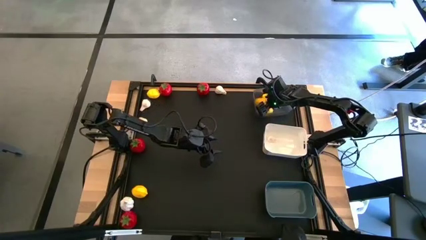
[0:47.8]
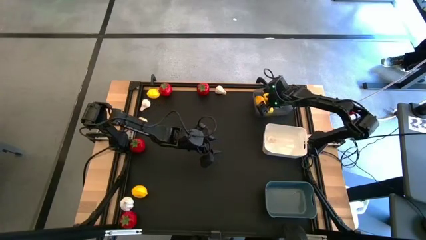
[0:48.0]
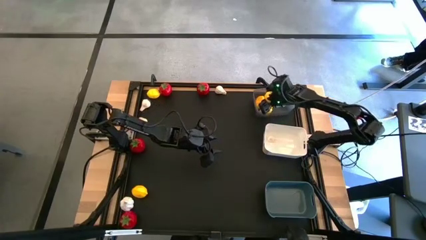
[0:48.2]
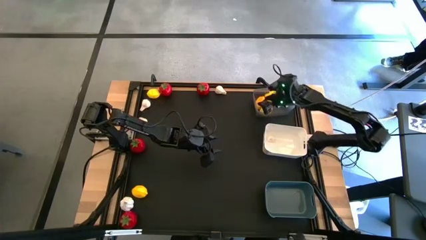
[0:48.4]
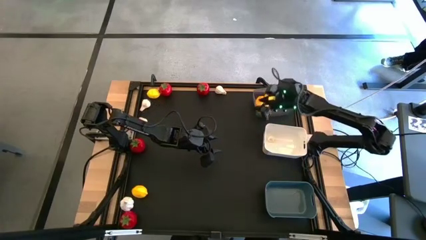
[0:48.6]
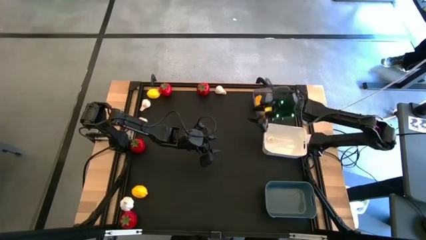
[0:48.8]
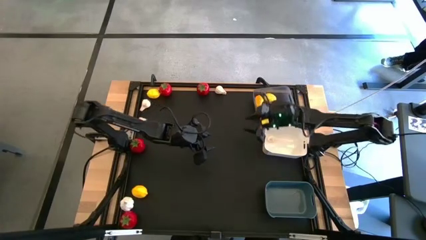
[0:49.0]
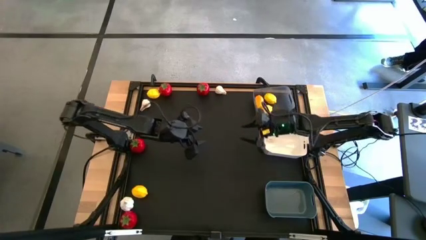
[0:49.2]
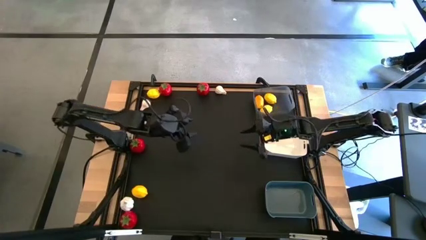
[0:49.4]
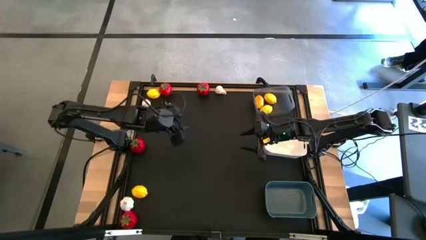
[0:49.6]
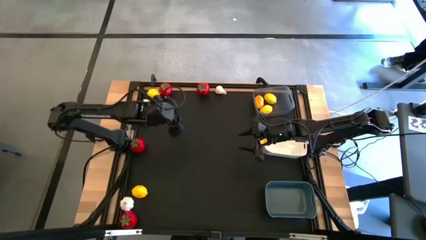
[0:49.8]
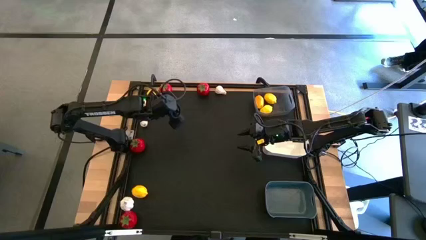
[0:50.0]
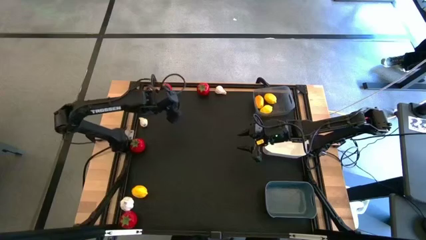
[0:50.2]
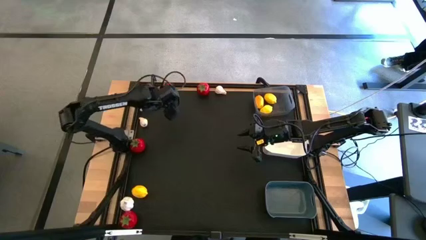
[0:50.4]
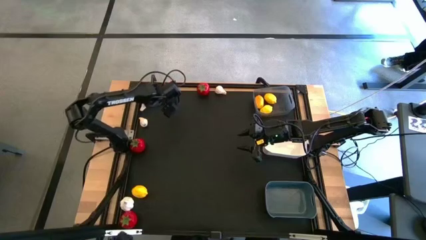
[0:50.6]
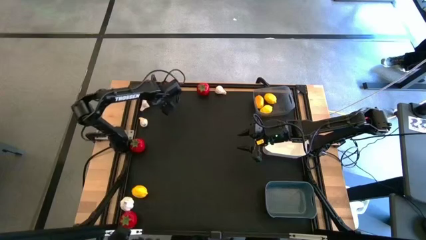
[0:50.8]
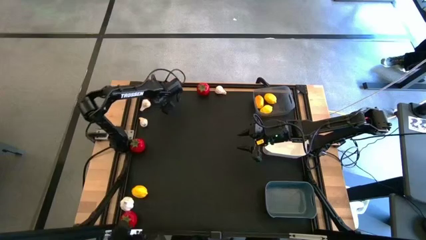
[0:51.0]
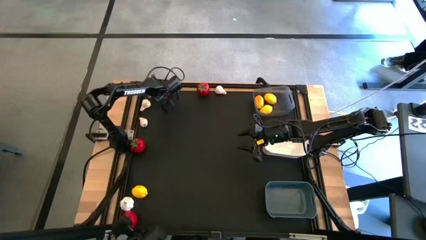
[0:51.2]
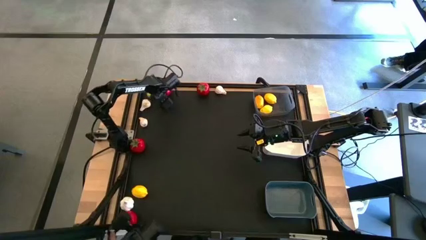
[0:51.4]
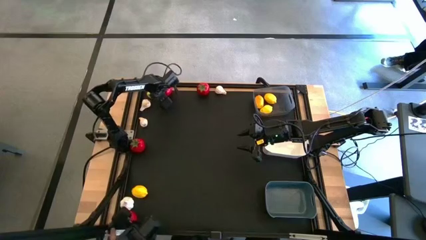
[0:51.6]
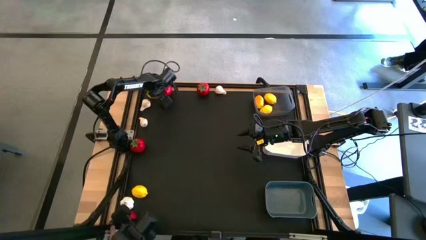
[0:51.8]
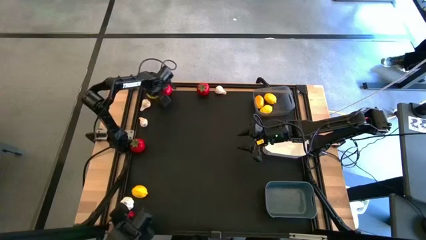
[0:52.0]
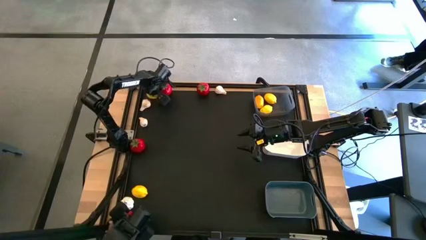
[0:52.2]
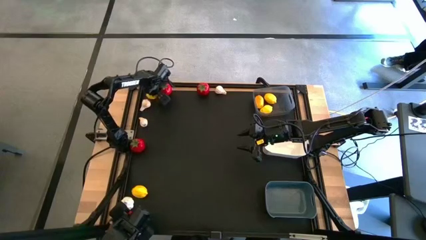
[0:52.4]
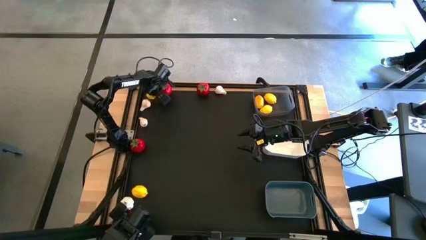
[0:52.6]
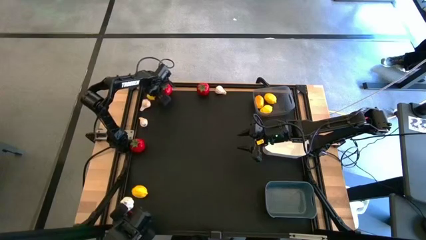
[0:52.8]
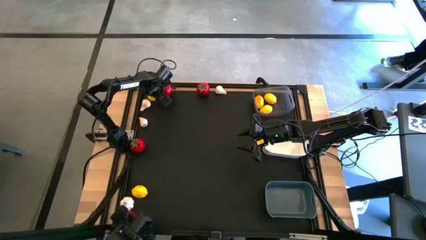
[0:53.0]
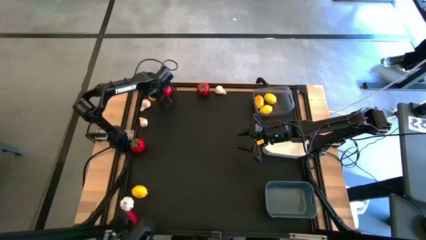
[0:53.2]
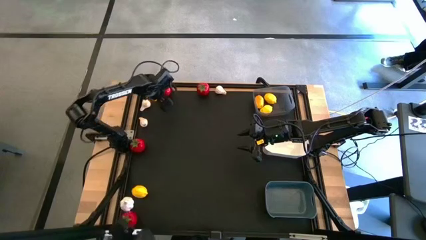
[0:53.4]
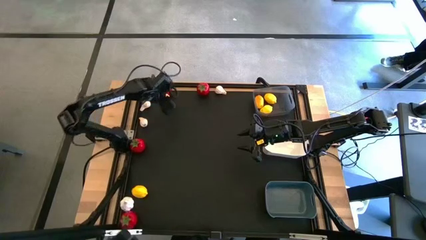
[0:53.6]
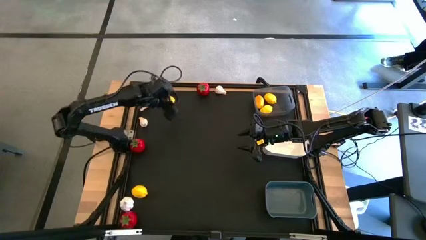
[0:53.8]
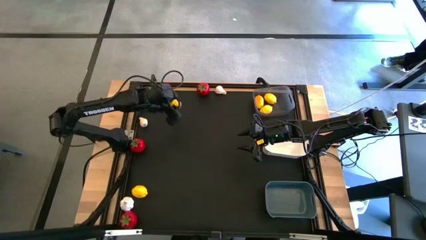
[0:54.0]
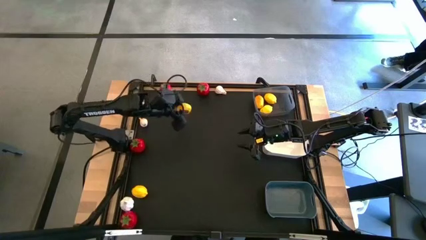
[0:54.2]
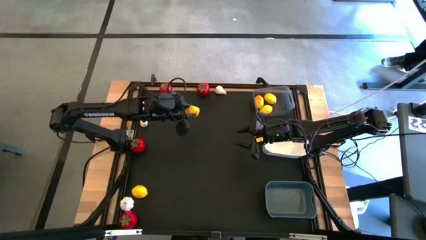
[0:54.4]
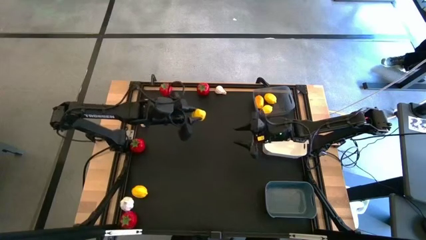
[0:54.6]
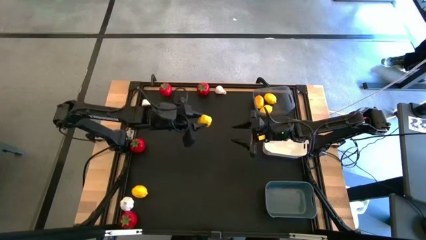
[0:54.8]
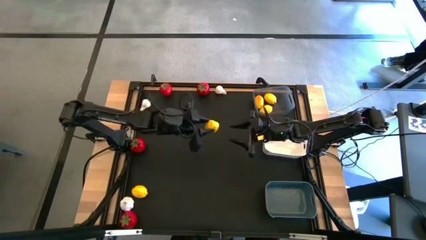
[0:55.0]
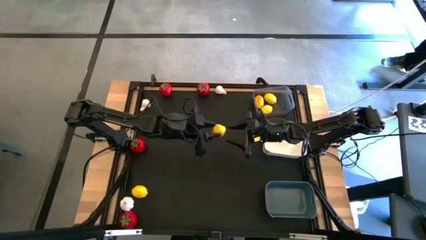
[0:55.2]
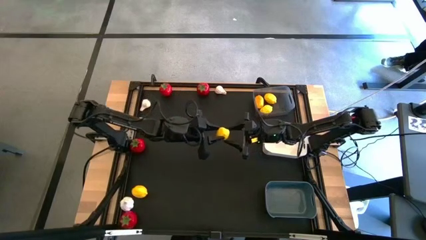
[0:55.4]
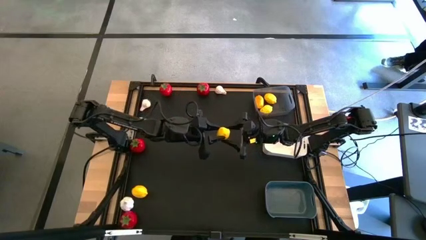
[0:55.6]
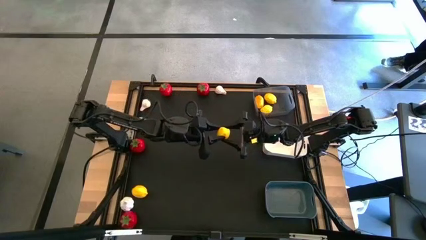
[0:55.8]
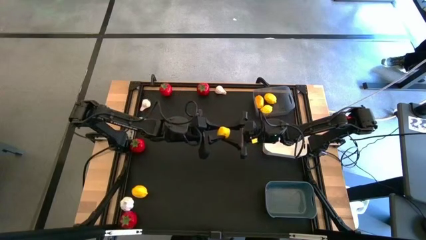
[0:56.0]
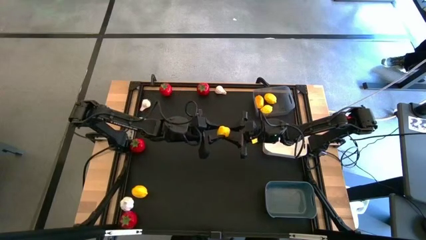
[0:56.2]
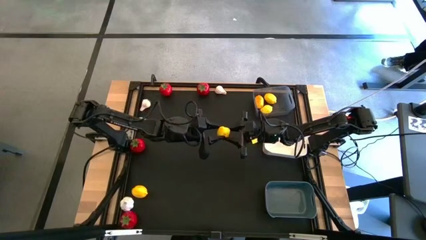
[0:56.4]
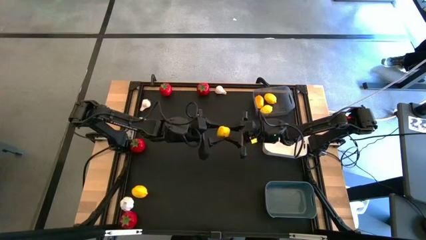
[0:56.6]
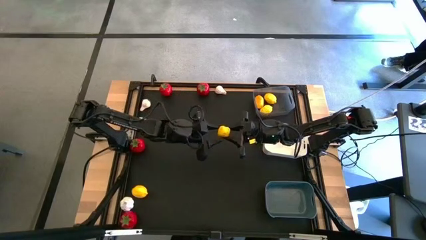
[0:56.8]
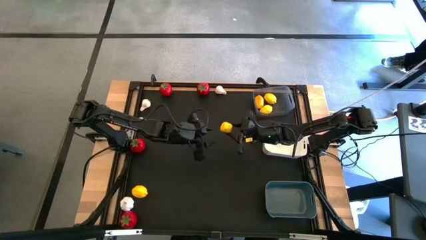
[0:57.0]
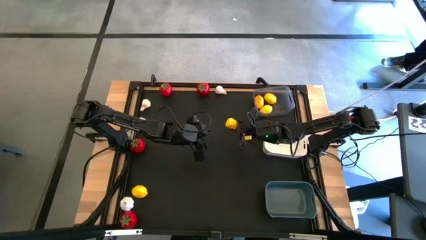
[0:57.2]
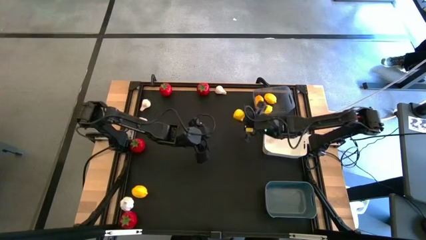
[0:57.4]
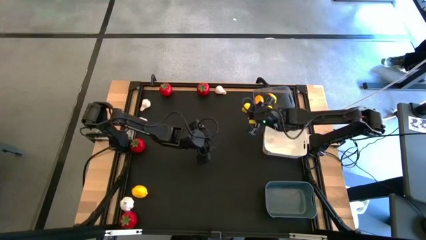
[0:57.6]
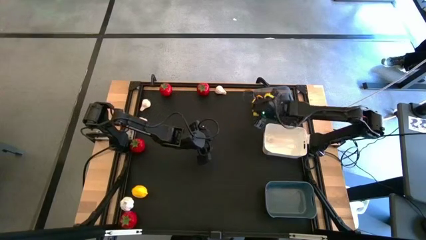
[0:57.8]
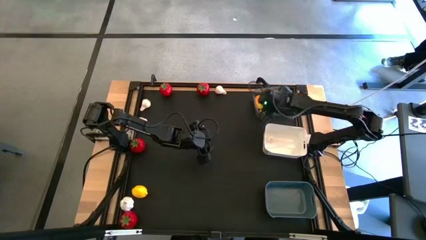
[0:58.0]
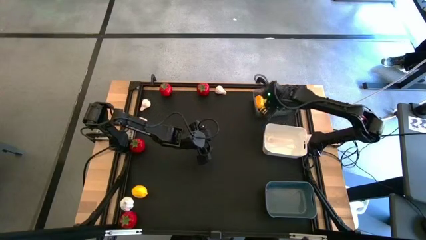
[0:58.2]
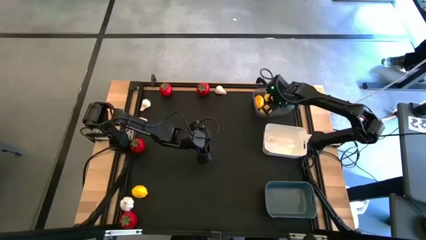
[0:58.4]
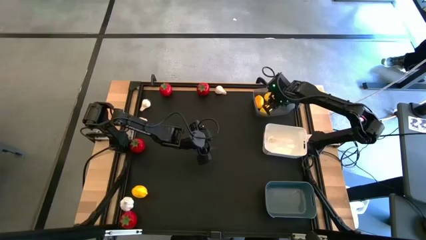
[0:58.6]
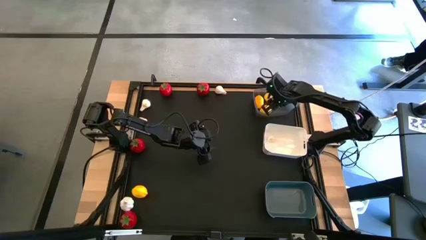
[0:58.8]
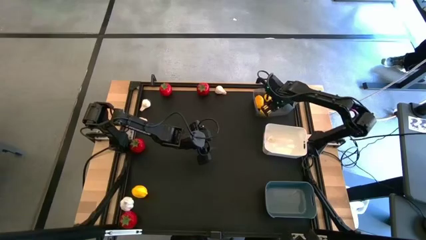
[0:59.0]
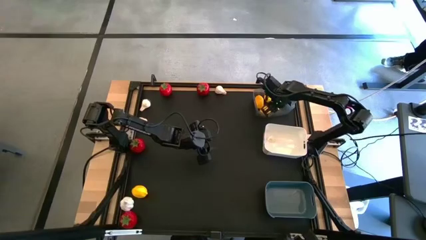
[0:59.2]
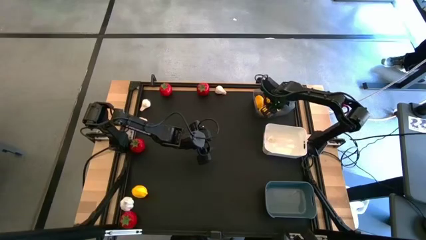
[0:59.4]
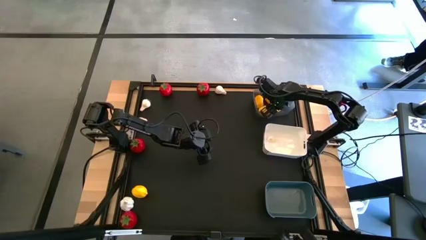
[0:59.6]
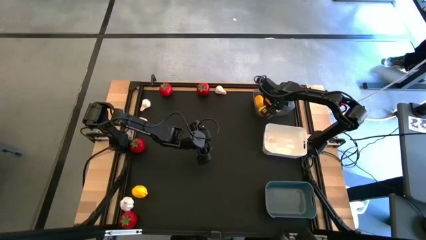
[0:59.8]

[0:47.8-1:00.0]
Task: Sort produce into baskets
Put the lemon into the black bin

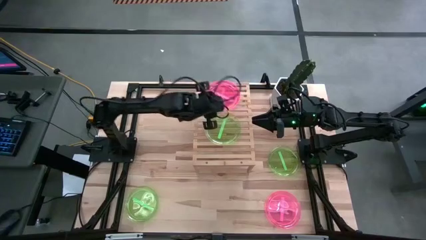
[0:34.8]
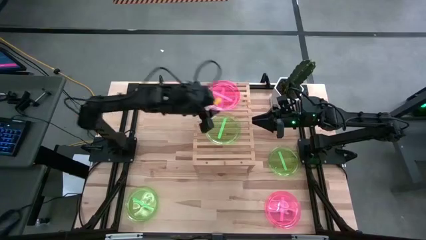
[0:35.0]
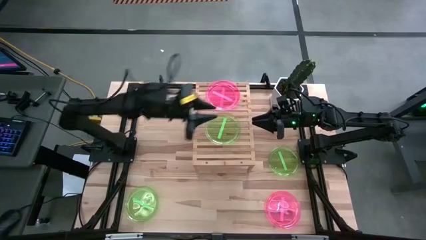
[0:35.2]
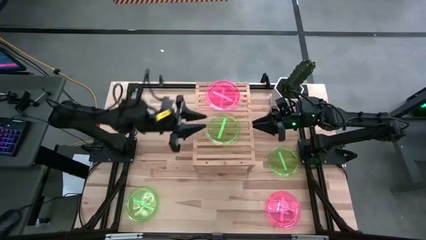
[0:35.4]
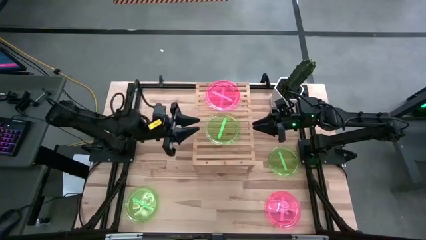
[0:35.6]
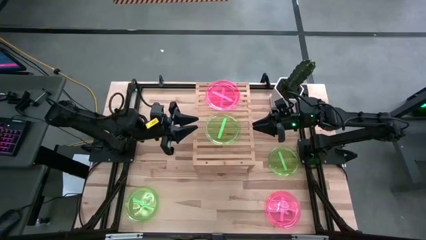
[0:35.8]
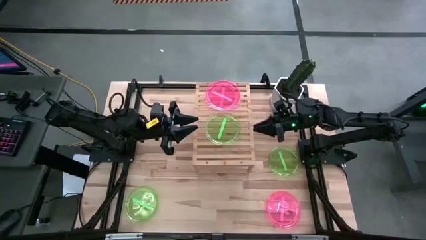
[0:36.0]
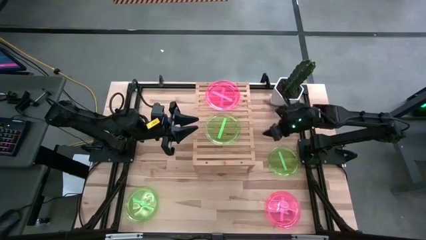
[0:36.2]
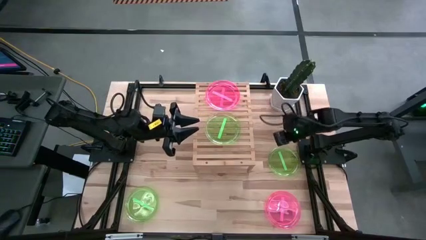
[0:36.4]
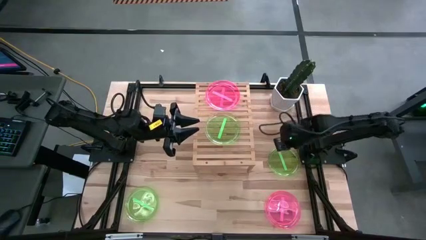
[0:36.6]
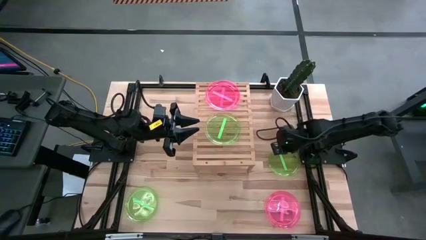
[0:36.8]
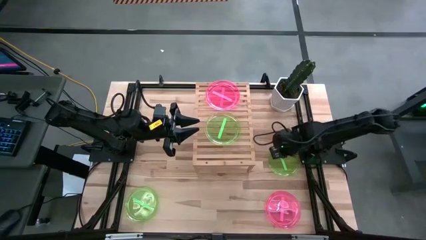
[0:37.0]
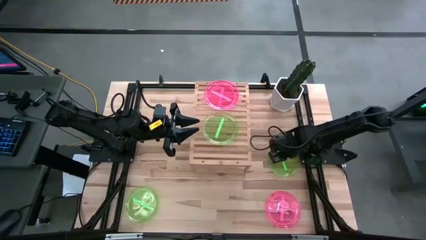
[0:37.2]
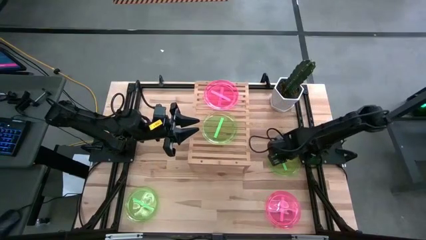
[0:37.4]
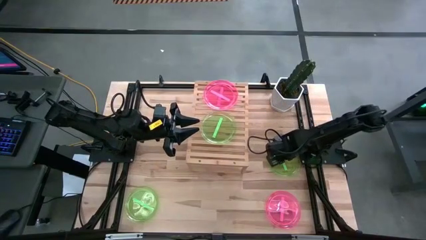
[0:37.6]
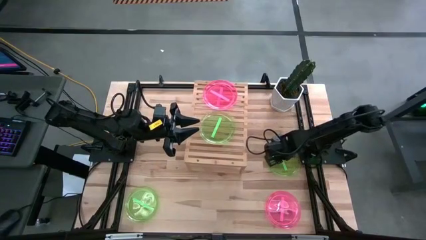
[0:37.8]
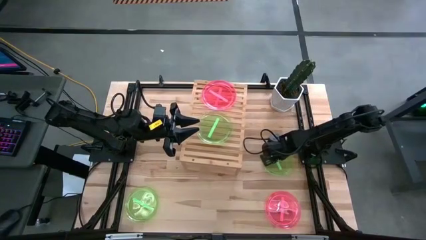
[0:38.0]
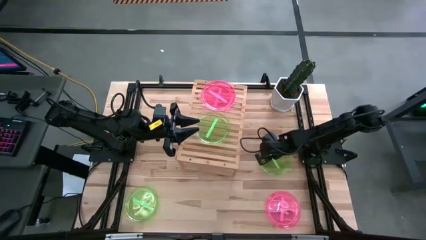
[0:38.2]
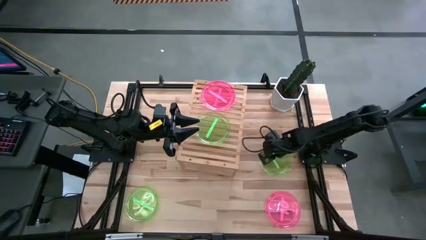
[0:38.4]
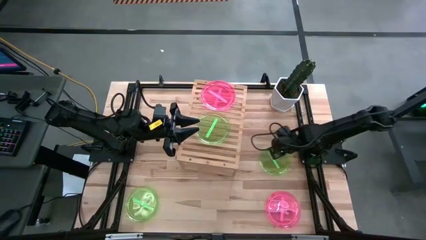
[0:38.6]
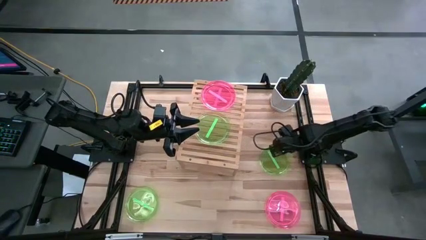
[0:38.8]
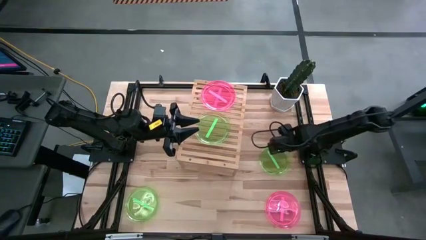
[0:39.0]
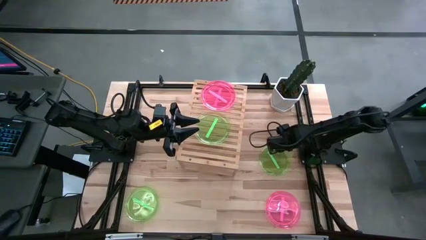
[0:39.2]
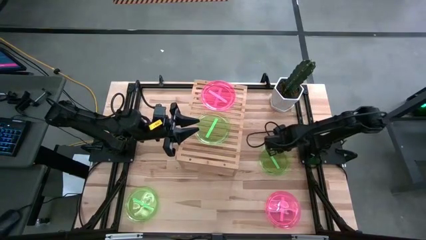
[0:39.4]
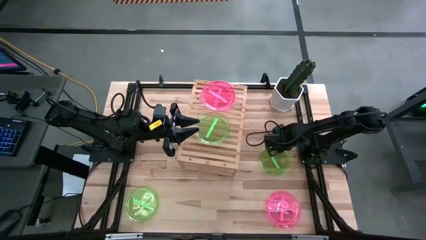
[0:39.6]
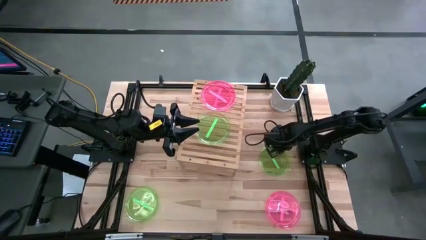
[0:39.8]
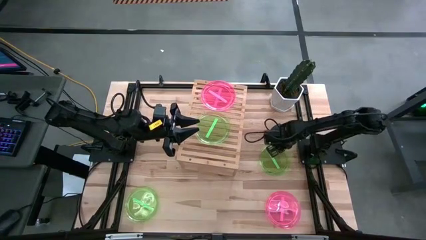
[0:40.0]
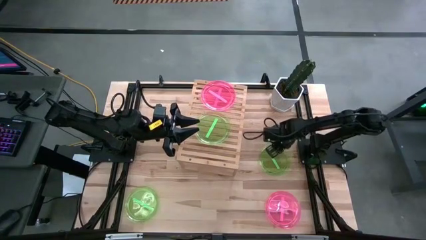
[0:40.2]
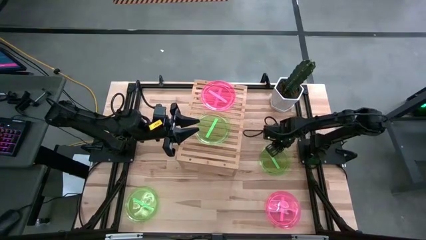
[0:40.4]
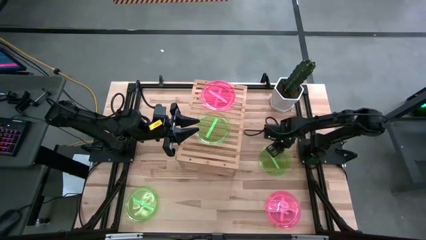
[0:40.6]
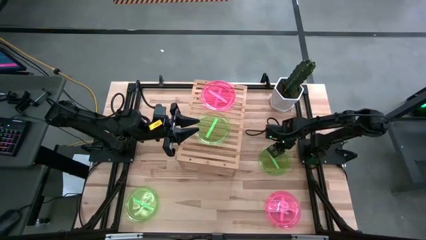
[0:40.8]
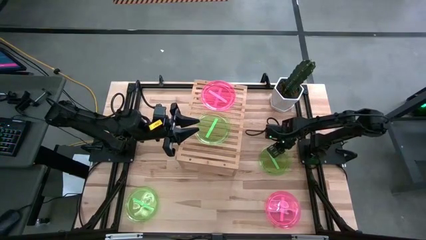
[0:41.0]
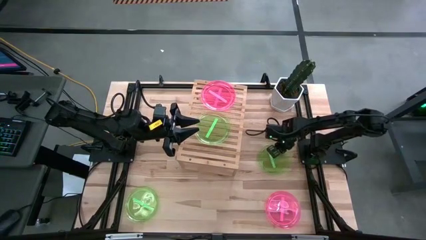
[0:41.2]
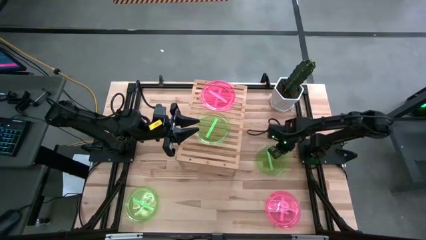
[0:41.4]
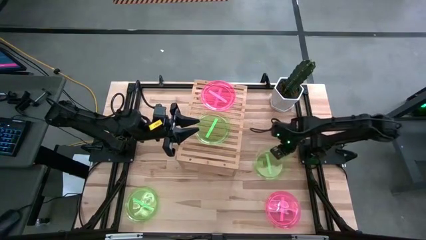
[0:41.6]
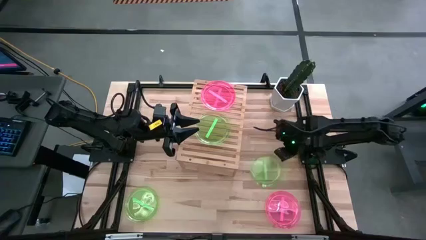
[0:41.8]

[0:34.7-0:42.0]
Task: Place and stack plates onto a shelf
Stack the top green transparent plate on top of the other green transparent plate on the shelf
